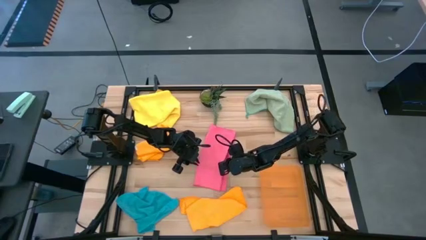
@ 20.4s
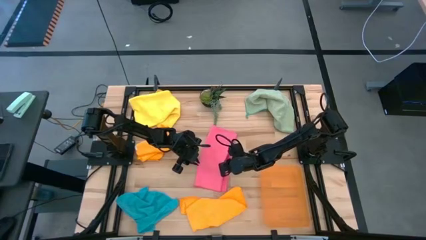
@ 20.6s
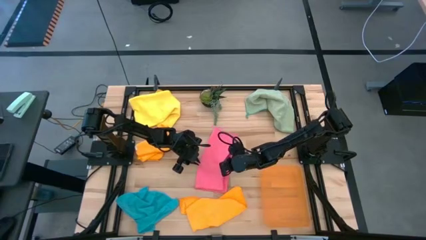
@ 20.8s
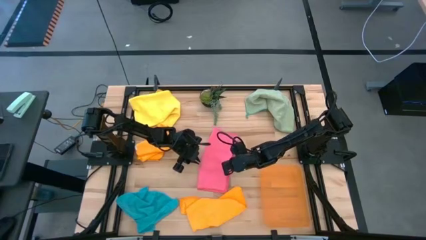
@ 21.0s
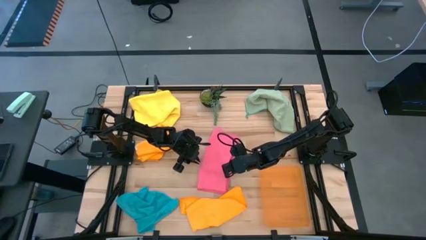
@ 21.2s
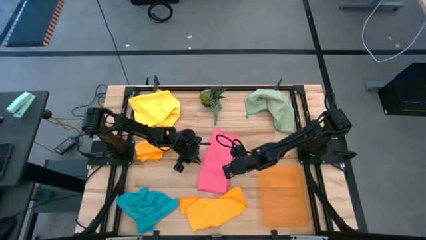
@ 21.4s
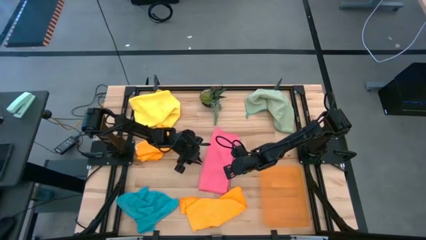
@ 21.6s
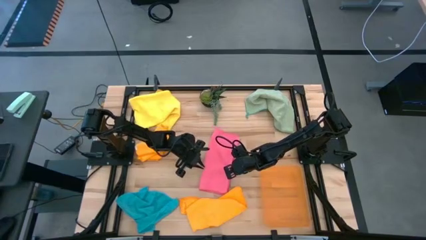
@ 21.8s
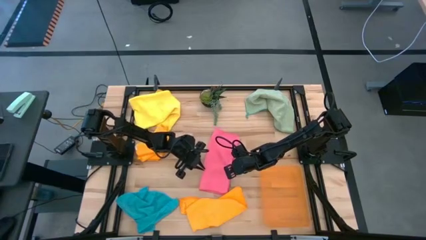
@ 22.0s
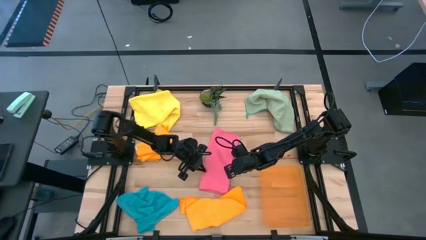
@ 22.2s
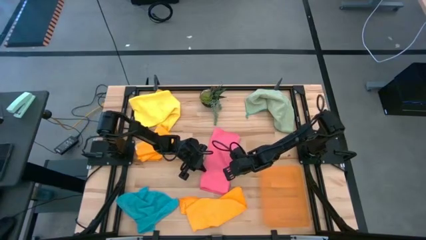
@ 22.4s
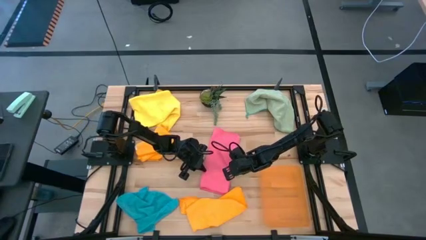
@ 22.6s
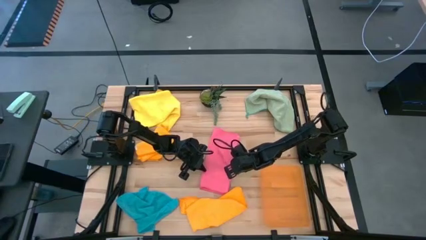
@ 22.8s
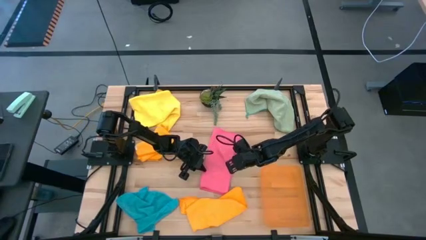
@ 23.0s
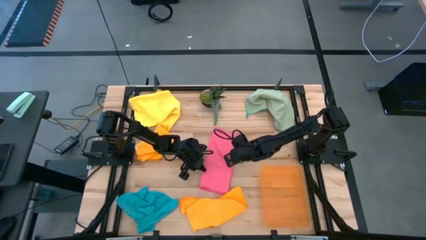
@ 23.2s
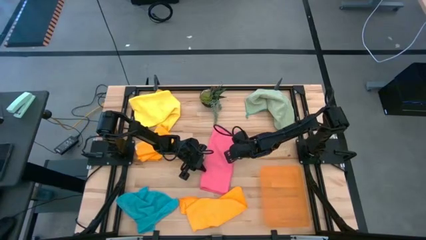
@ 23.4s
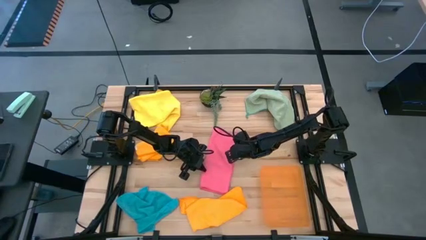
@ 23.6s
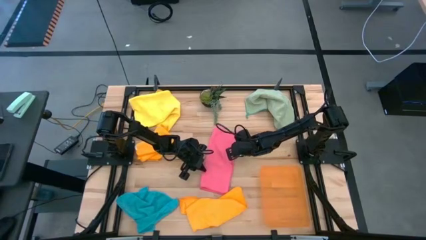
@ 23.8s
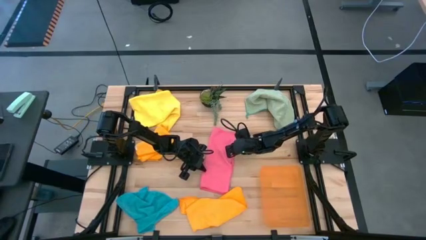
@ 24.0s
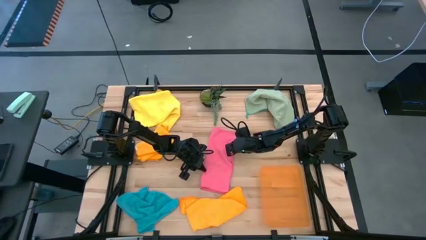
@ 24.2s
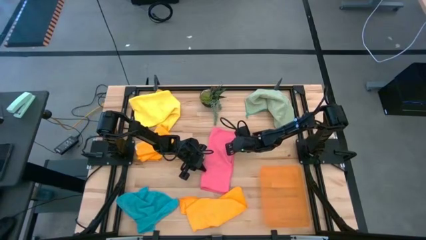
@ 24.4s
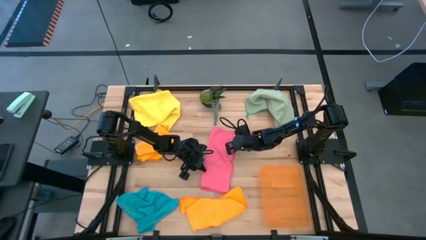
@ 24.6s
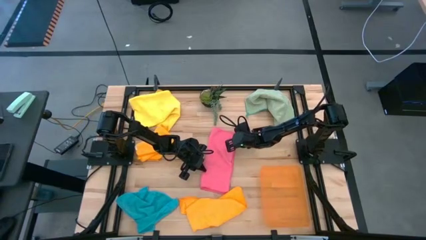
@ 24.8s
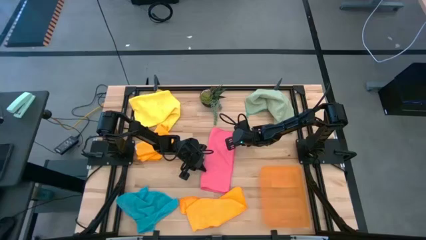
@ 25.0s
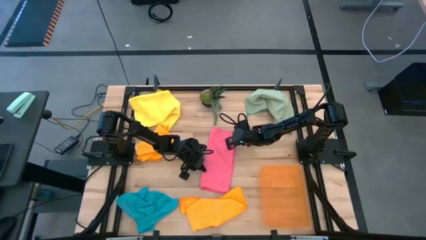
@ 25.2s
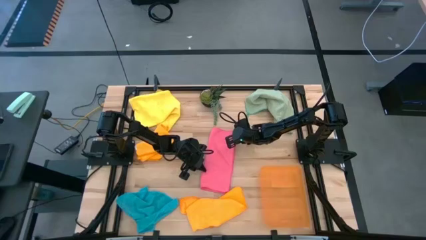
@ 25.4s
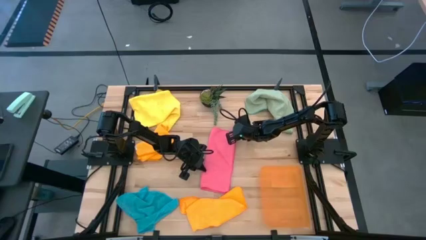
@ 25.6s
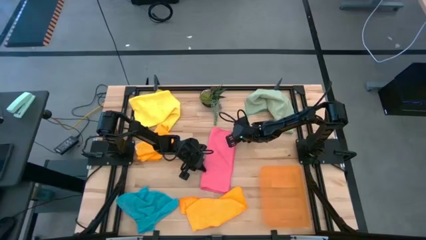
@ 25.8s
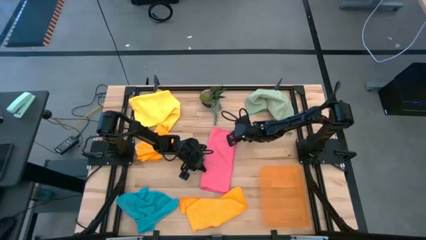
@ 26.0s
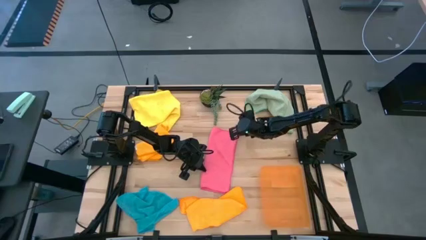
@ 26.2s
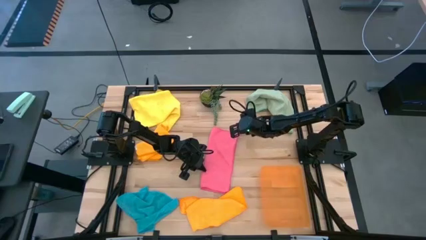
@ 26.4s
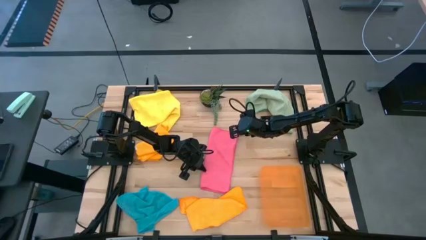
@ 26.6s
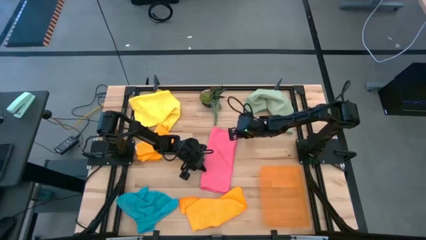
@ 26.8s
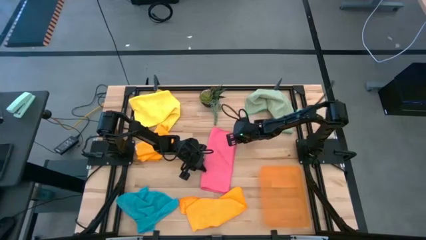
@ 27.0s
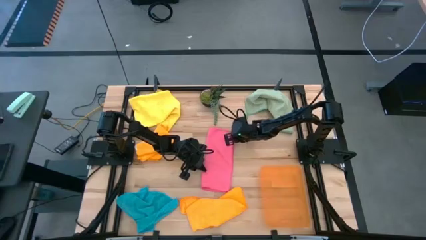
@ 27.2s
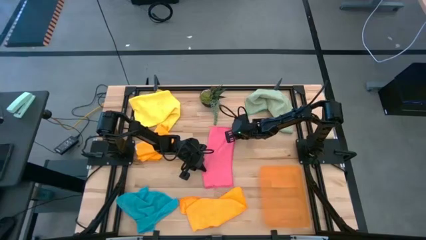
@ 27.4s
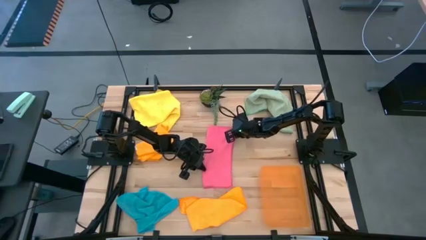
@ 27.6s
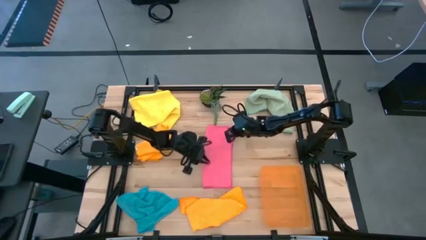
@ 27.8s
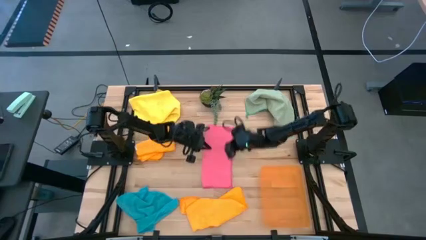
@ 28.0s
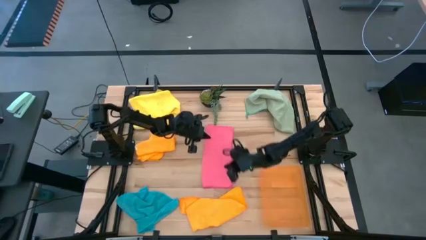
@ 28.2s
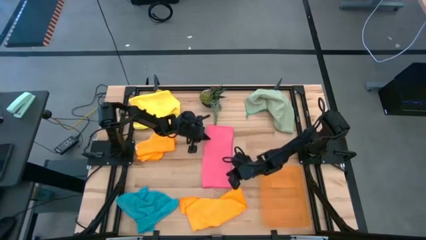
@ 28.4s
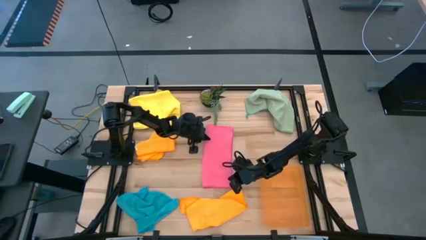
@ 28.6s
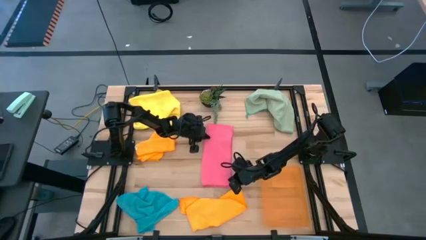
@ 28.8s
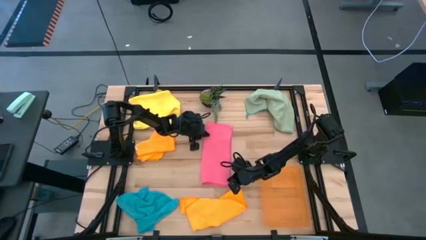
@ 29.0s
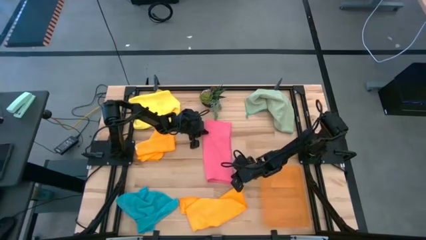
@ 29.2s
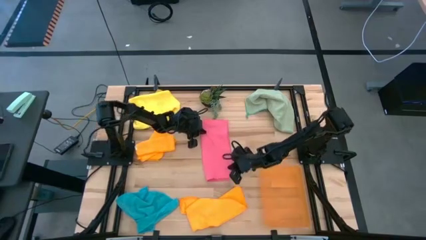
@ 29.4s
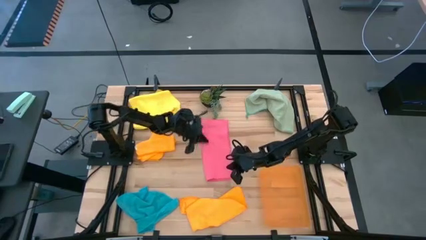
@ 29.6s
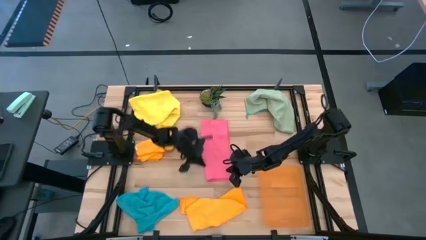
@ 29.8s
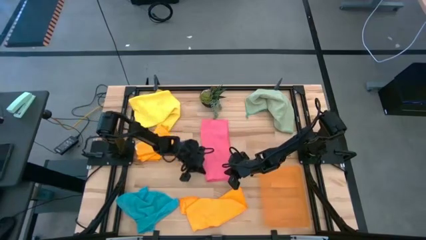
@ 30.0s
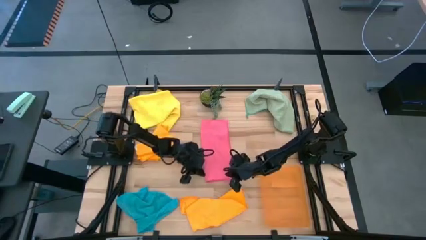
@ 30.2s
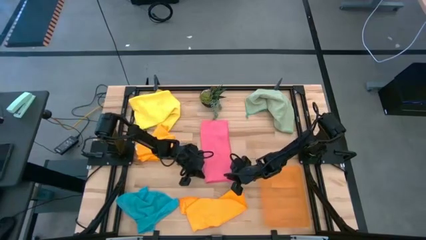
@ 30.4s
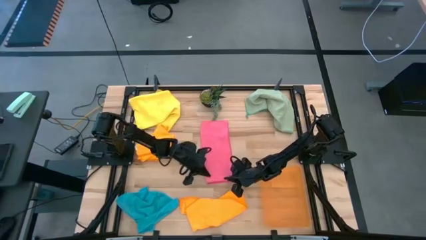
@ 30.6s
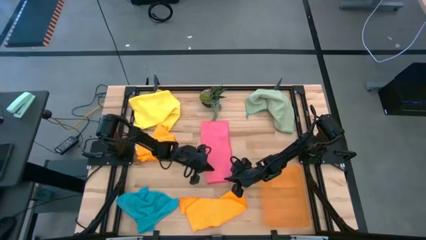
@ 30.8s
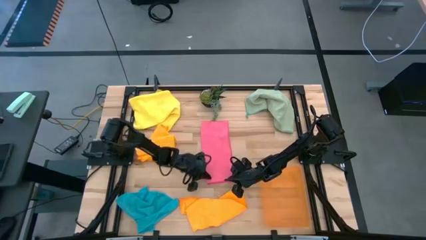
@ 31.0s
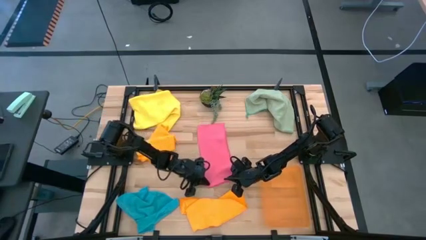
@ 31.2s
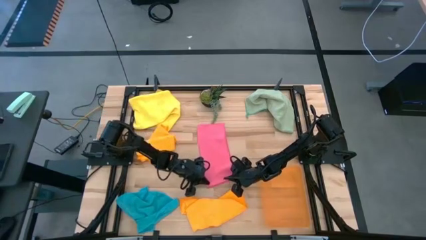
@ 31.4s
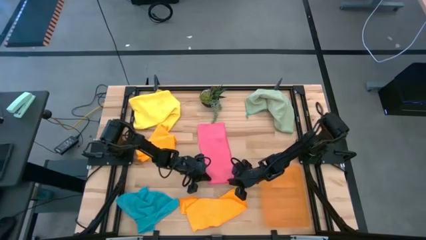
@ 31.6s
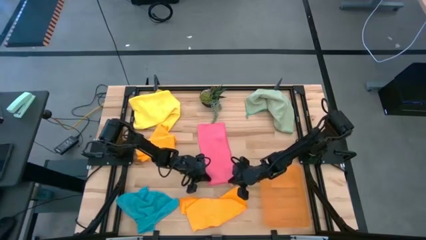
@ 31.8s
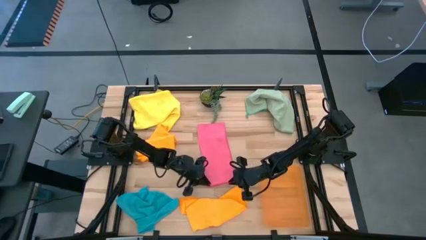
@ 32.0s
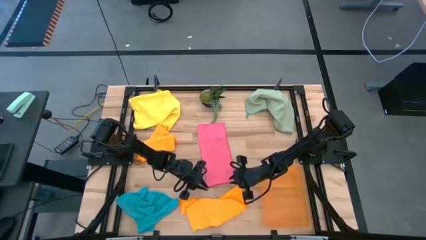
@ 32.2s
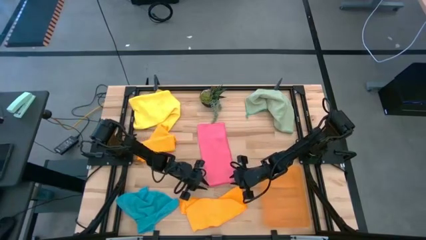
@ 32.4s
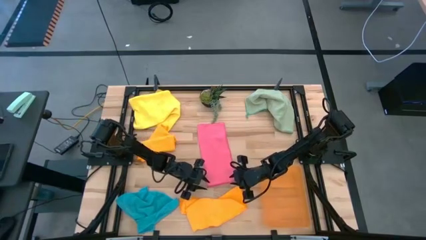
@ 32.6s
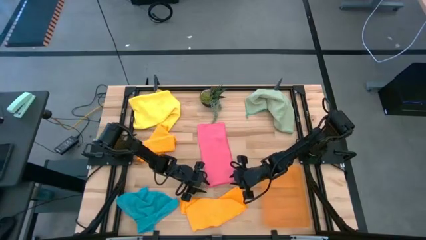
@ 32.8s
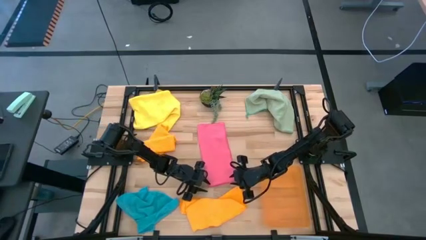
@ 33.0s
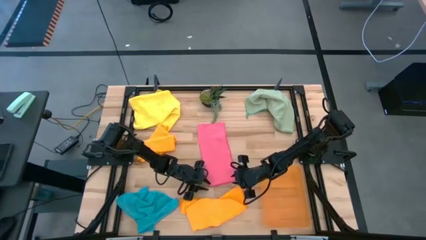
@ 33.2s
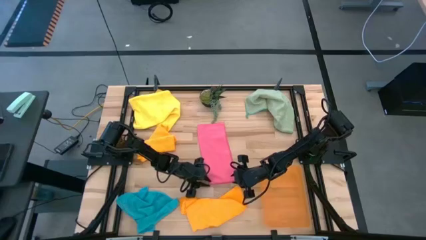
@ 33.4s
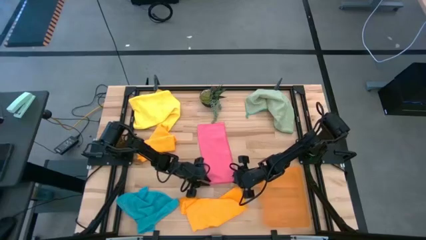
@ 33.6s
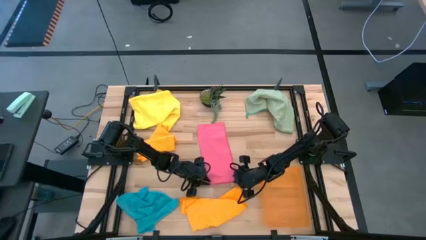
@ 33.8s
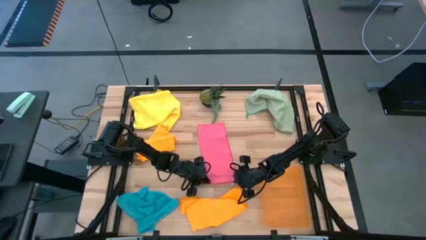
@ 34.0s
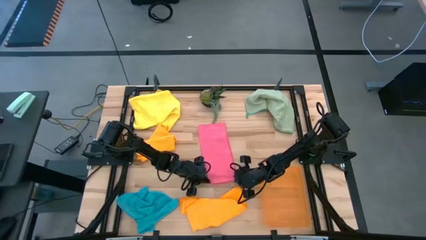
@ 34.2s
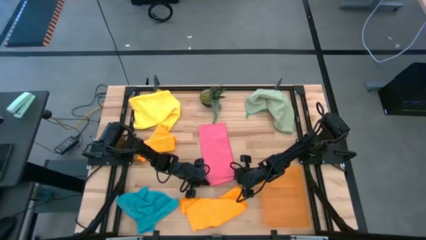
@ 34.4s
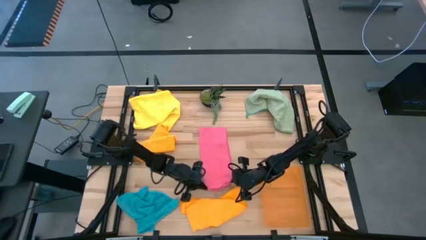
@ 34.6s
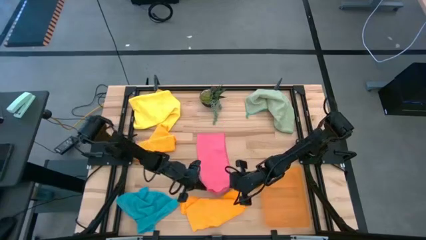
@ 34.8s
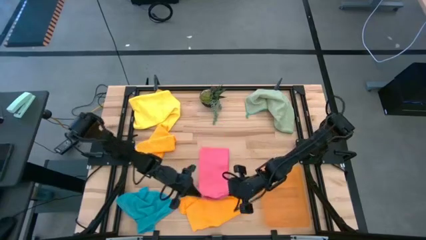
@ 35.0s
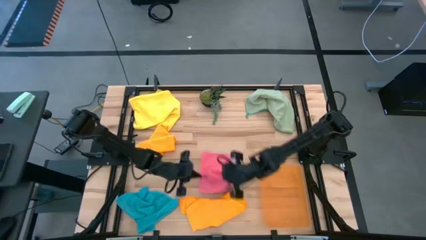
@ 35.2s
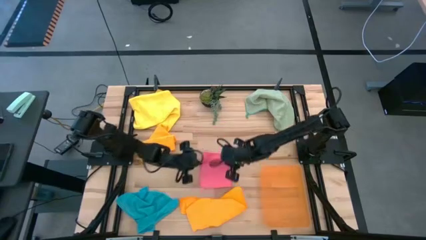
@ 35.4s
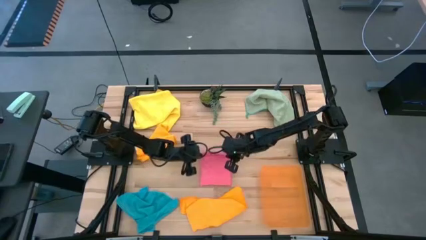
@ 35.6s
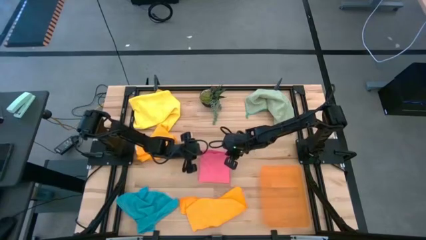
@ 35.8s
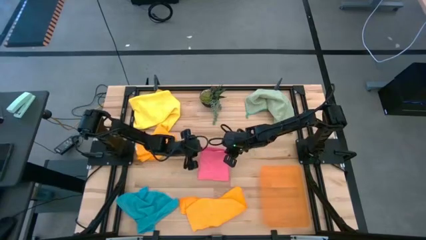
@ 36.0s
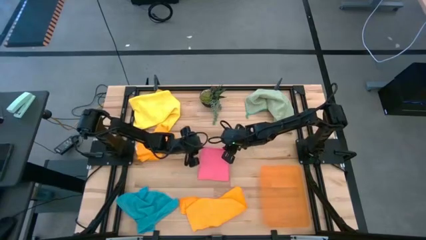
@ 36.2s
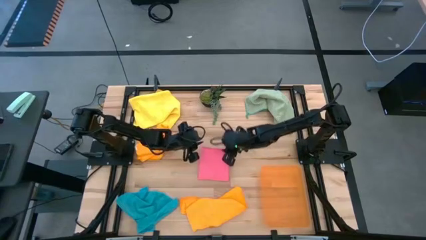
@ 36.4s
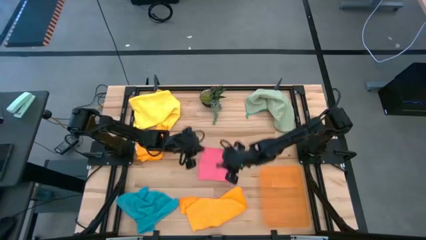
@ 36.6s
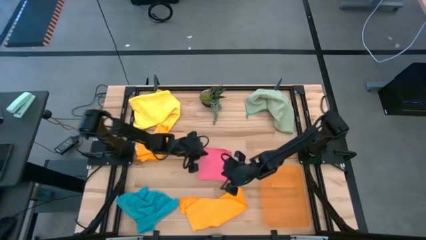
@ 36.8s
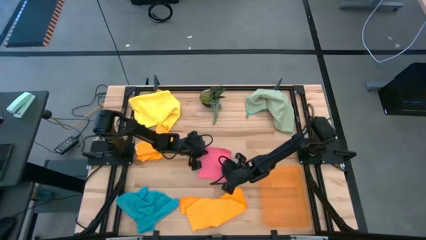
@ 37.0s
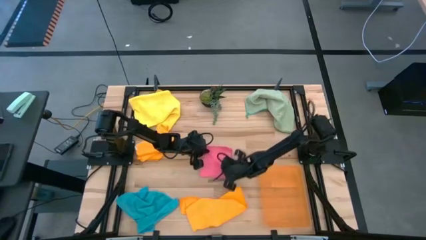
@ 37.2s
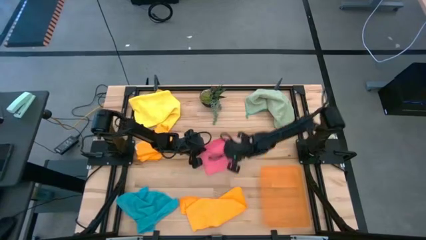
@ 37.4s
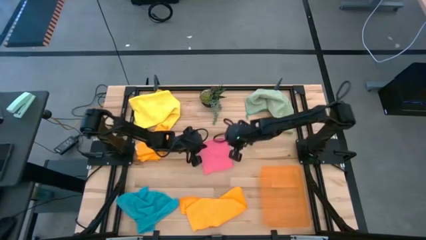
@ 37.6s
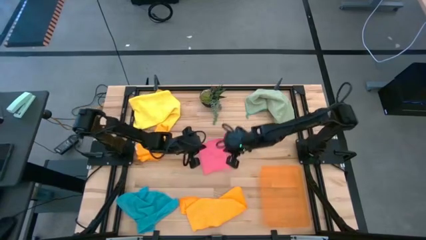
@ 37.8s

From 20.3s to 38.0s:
Task: Fold microfiber towels
Fold the pink microfiber towel
